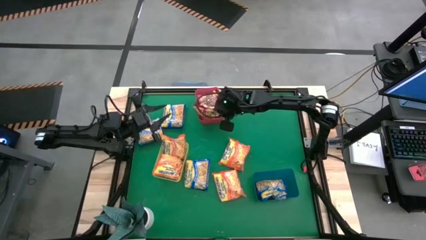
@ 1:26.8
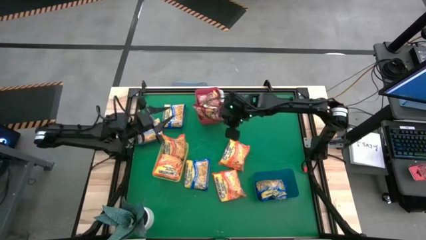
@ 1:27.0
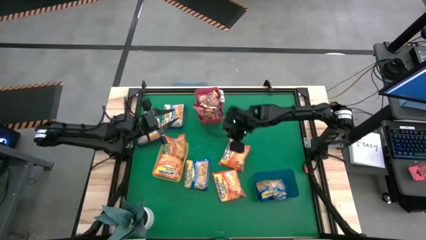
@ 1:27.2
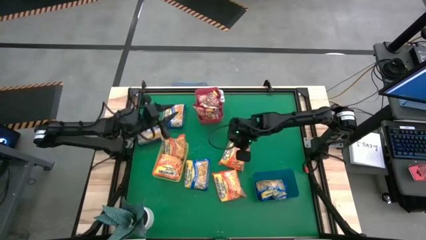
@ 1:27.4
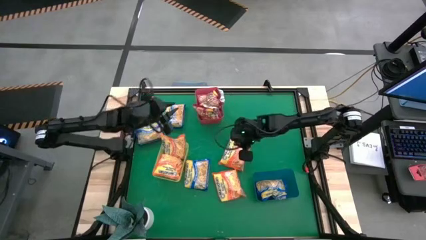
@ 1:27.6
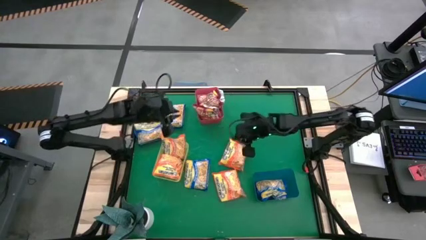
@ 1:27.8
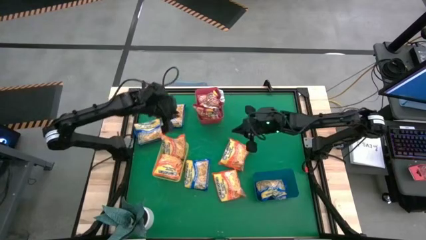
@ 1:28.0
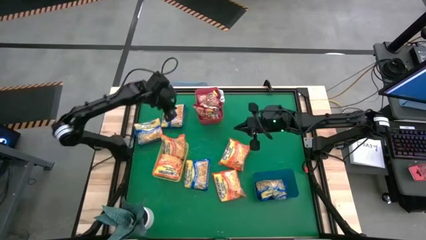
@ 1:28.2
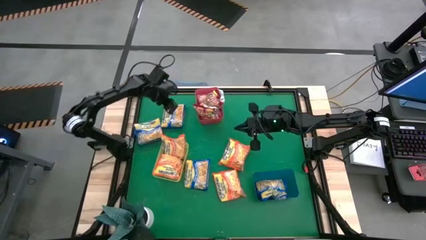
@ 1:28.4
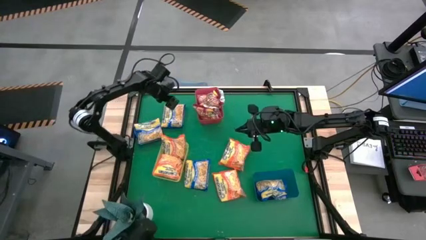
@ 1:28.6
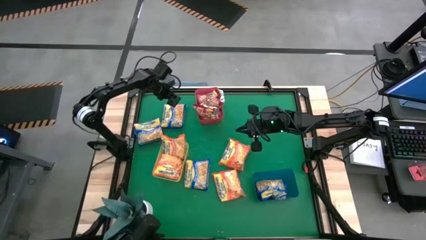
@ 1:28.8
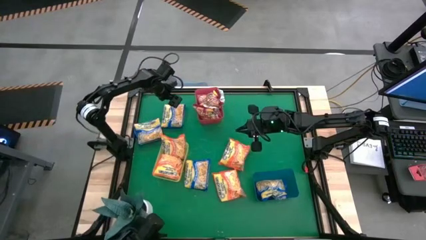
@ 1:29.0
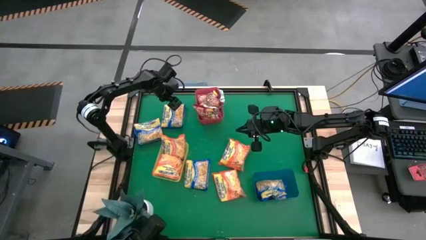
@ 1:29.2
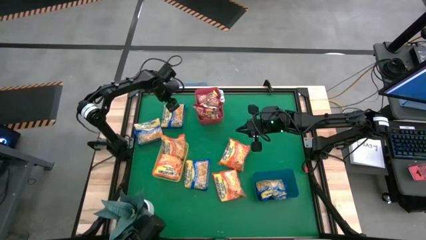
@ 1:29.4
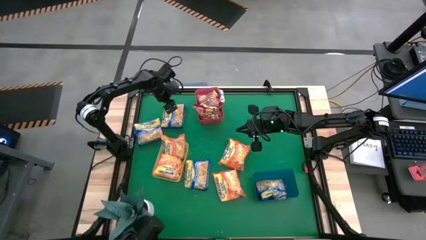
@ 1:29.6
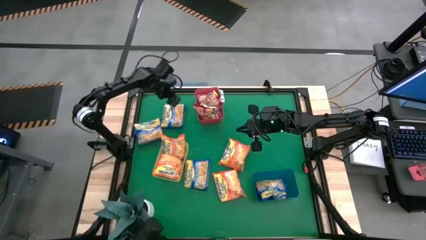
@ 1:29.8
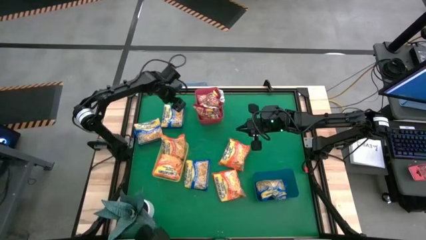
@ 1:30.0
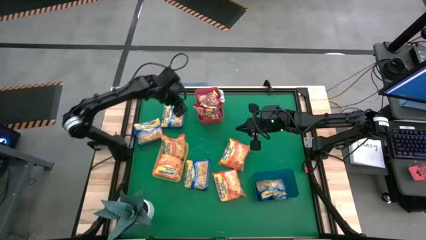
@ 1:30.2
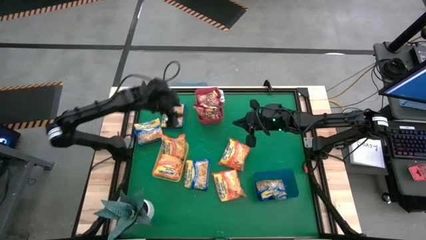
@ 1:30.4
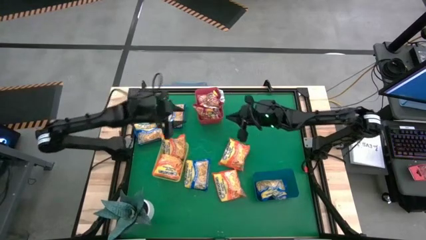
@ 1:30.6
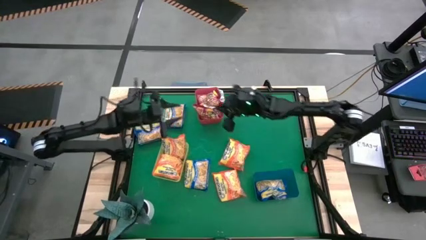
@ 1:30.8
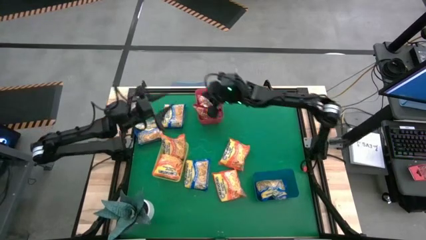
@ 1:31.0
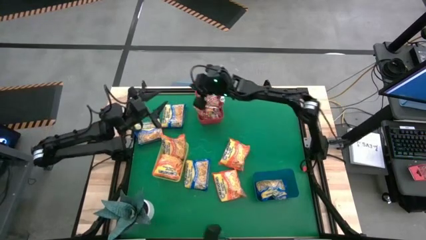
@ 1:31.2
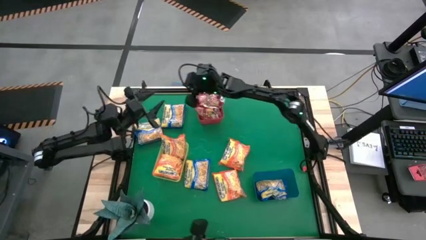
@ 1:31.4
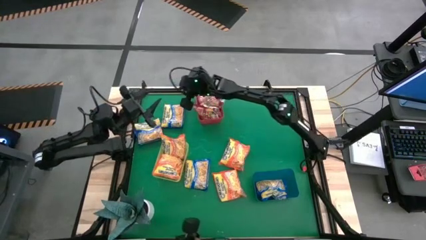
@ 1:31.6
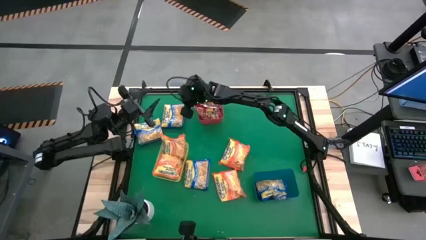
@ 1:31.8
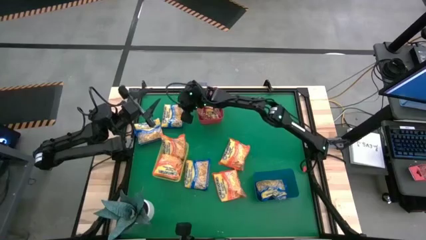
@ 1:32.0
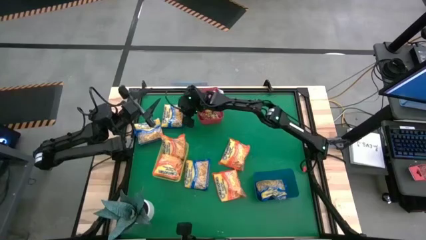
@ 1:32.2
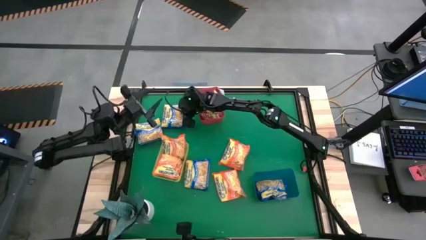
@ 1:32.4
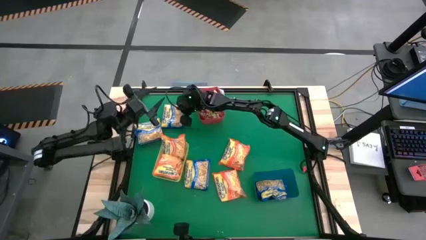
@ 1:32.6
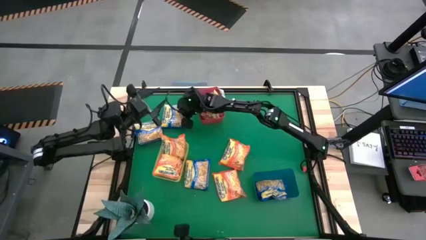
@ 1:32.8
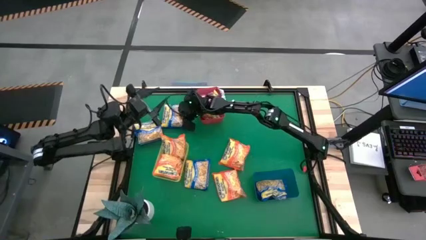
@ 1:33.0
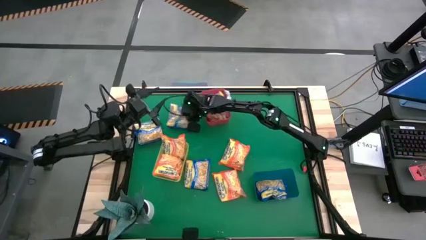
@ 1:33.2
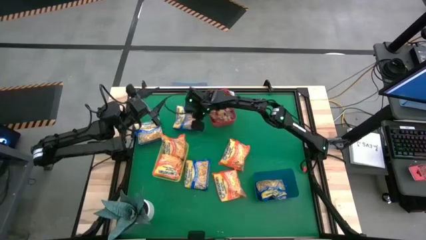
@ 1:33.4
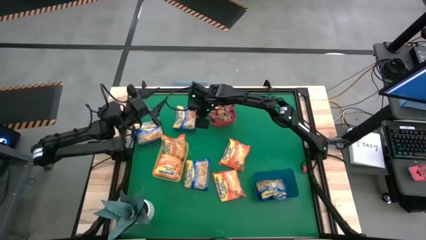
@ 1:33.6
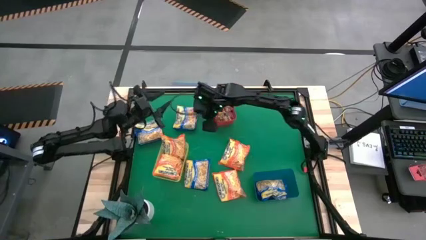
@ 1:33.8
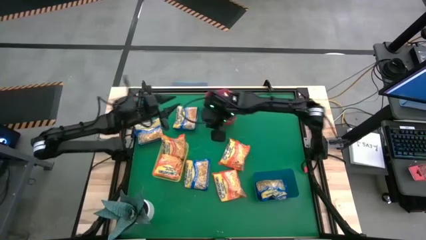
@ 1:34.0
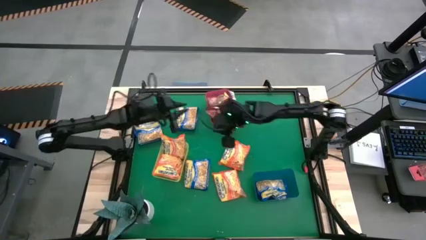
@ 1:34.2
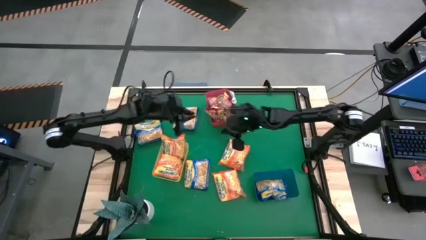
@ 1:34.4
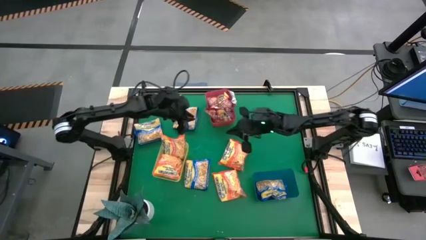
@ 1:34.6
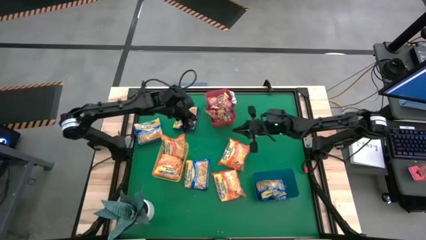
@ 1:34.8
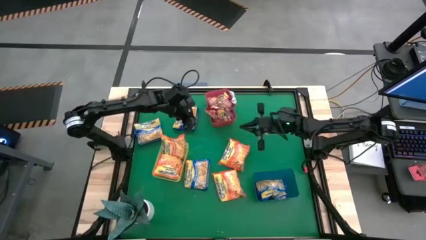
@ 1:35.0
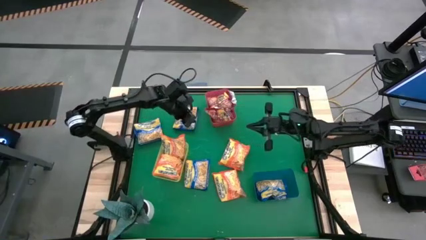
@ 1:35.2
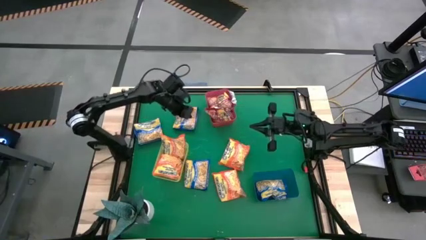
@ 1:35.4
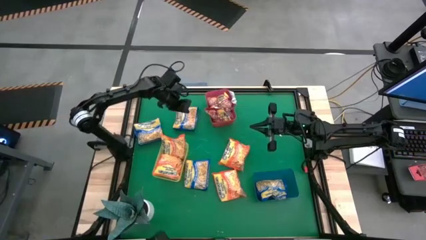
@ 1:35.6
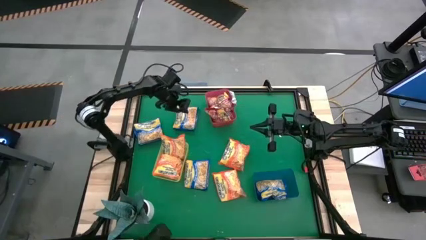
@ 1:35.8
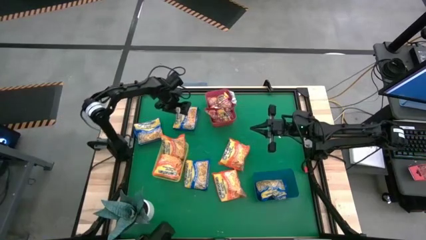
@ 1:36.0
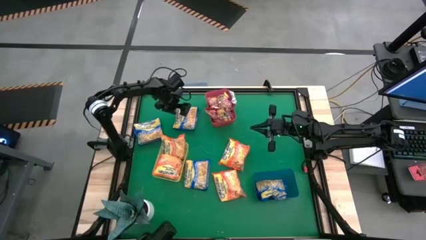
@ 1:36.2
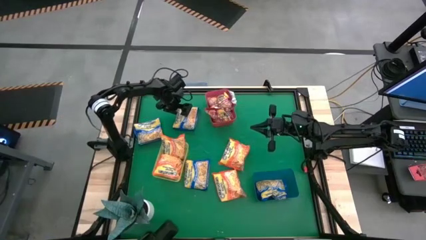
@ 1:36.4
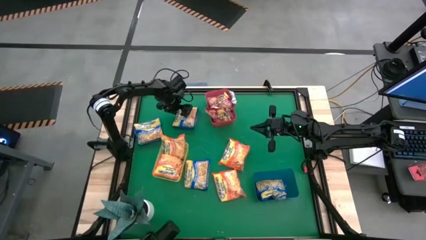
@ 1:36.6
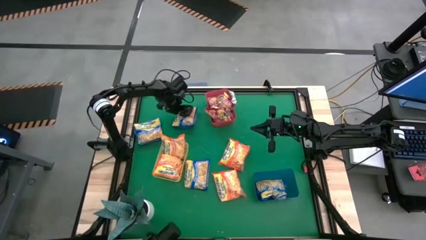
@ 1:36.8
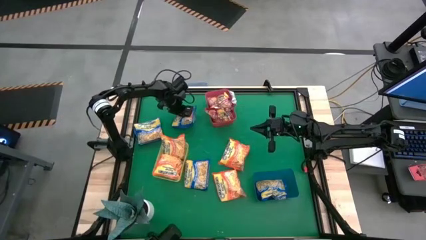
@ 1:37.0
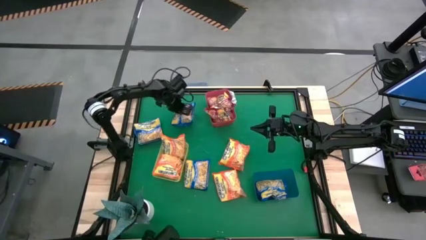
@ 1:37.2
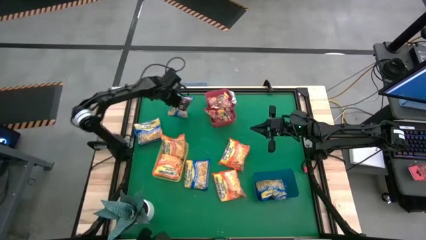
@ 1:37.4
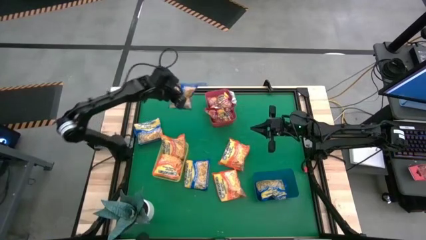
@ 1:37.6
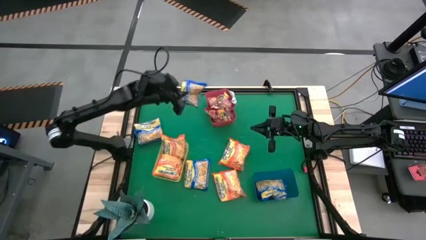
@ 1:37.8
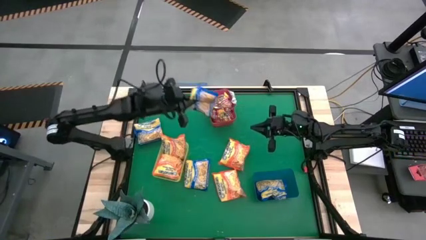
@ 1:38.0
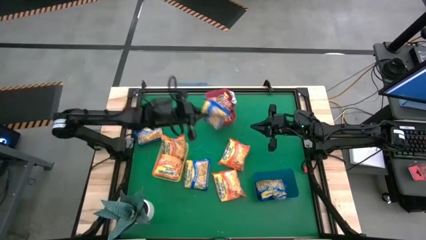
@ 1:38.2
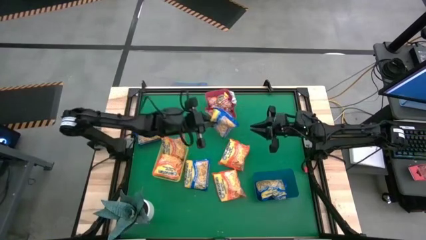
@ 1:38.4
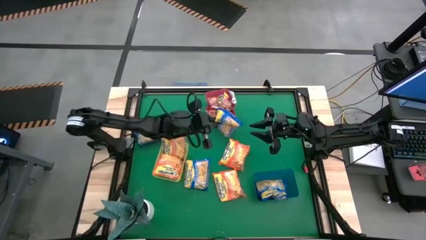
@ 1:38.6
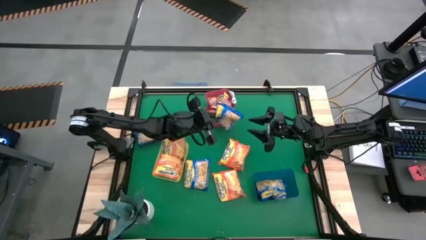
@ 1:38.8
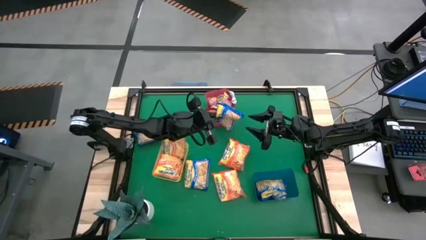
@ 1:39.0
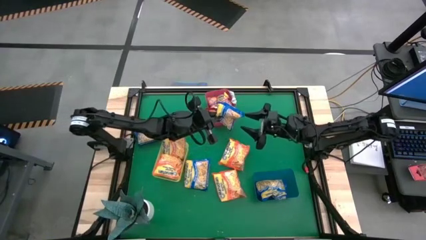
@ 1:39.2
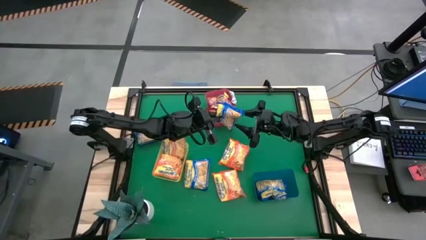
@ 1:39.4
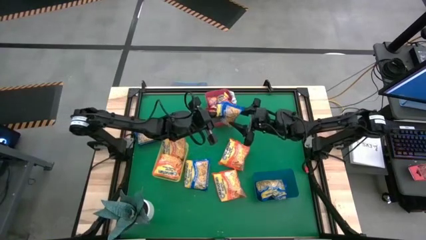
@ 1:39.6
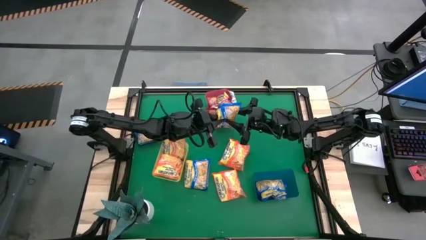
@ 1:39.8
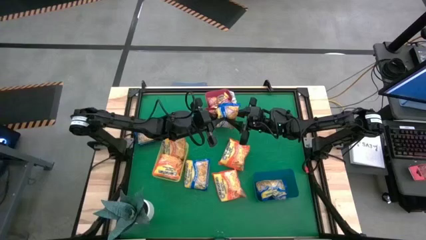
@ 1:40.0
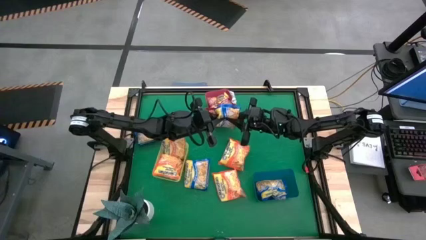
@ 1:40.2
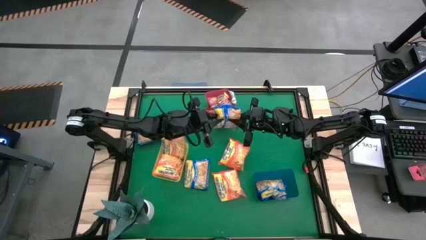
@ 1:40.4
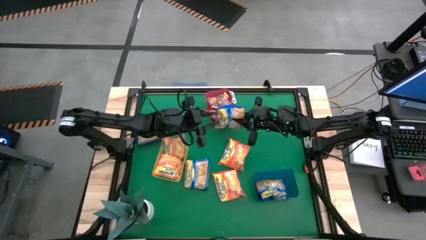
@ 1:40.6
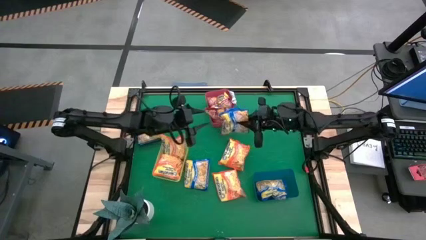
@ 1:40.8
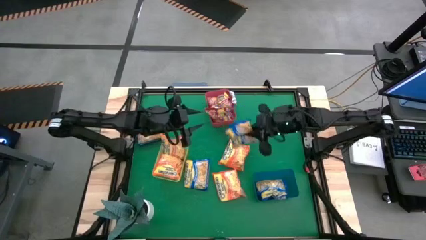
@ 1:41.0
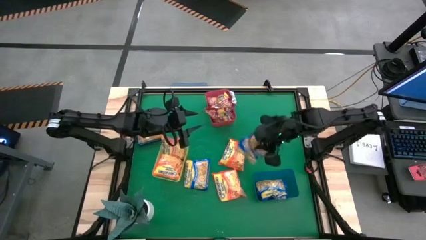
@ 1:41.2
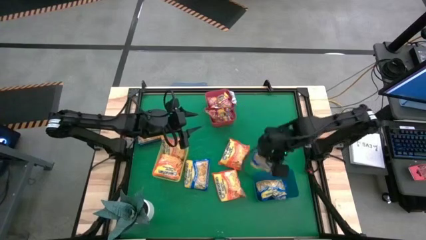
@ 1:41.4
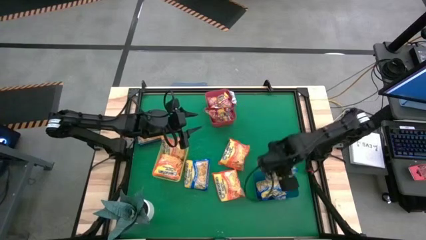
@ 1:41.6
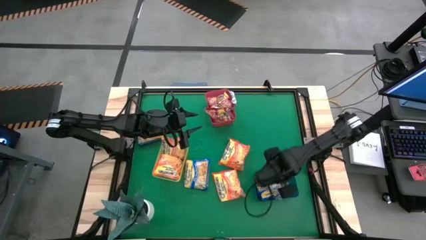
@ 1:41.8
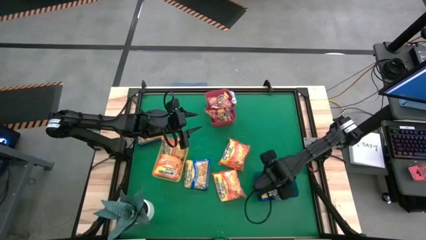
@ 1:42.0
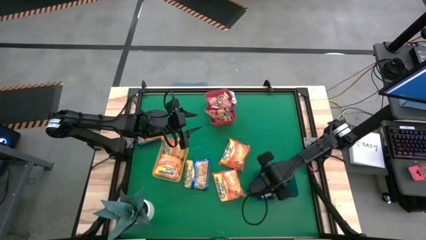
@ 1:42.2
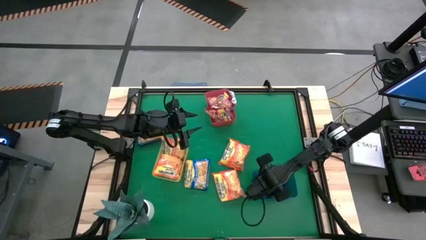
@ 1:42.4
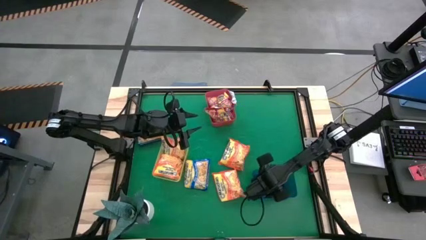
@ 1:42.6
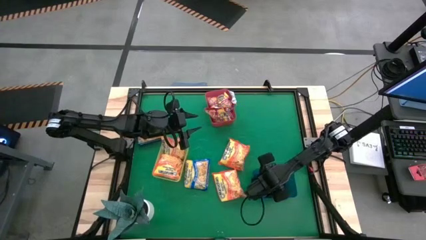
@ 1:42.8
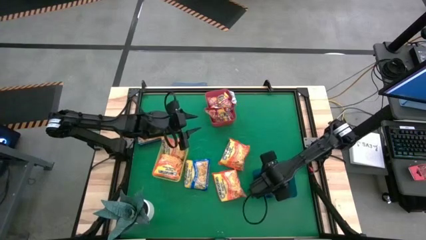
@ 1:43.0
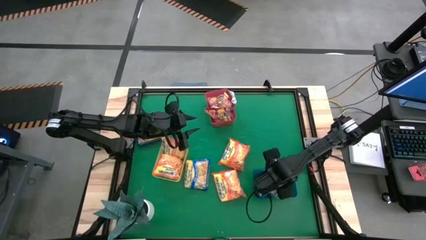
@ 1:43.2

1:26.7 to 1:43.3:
Task: Sort Maruchan noodles
Put the blue noodle pack into the blue bin

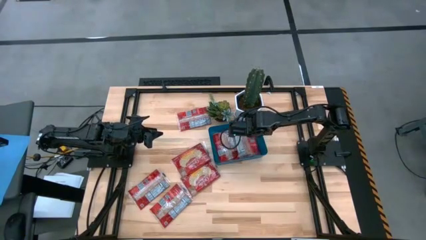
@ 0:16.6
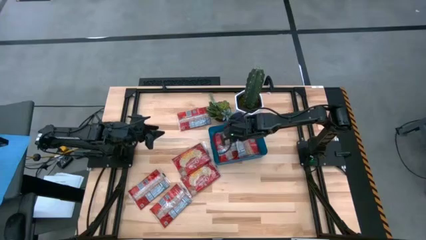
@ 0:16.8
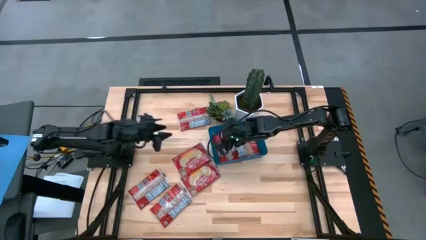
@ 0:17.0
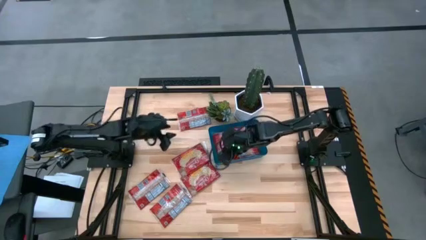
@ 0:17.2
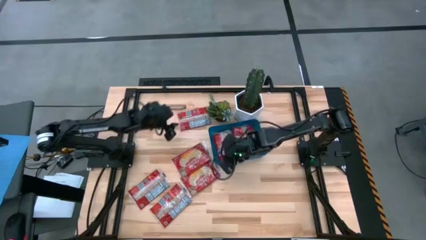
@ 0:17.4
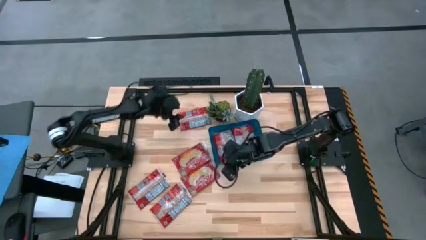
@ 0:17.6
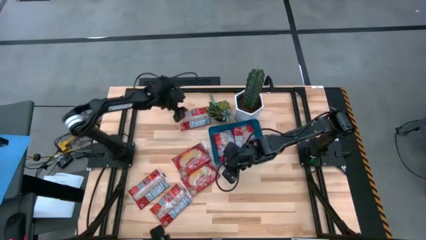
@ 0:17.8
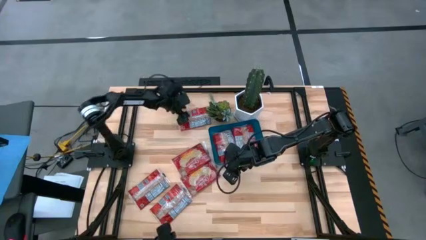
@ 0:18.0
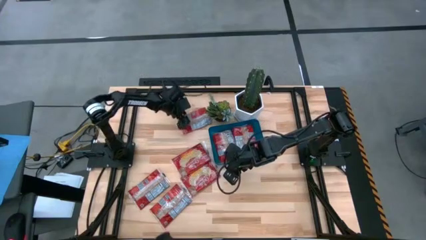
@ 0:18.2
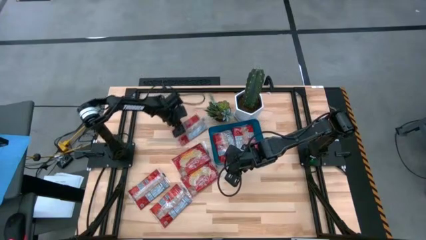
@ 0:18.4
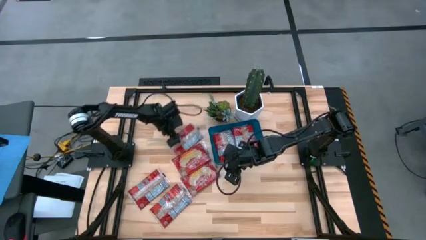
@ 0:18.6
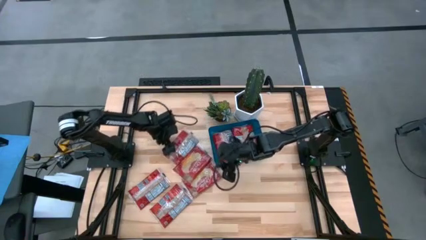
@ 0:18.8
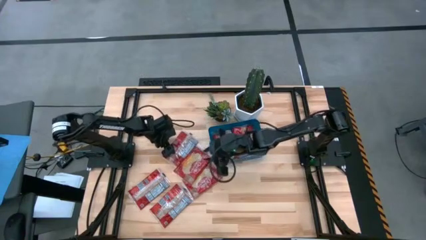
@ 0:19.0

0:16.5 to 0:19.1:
Task: Sort popcorn bags into baskets
Move the red popcorn bag to the center of the table
